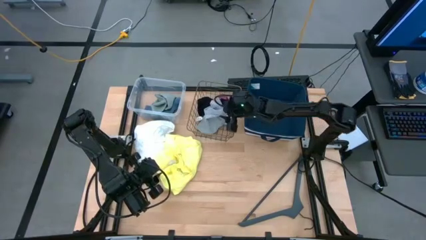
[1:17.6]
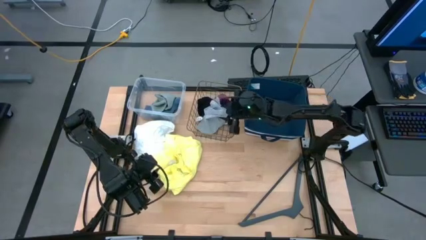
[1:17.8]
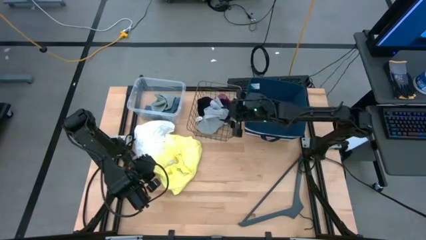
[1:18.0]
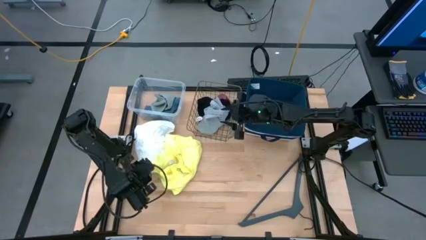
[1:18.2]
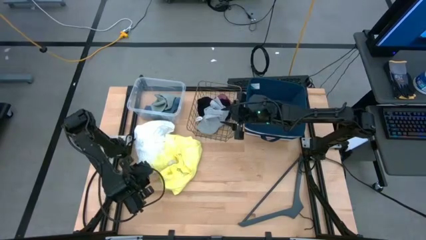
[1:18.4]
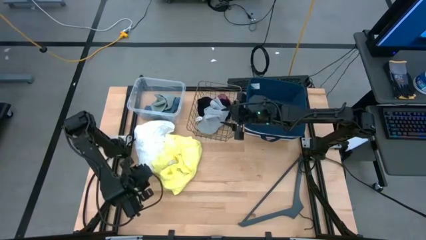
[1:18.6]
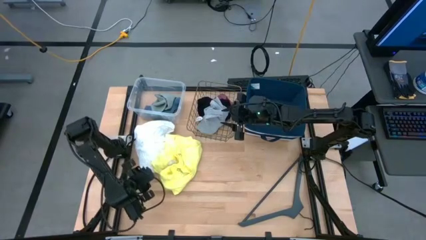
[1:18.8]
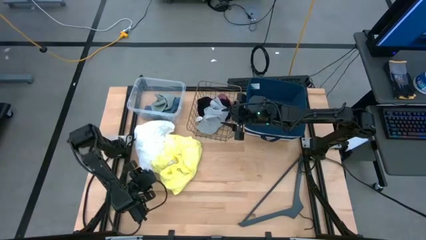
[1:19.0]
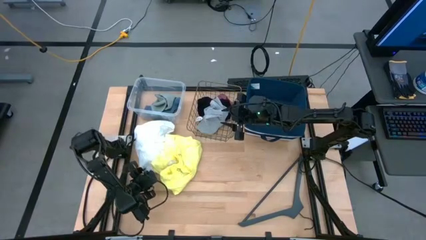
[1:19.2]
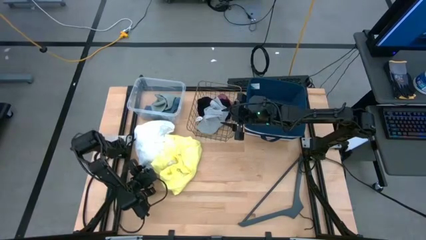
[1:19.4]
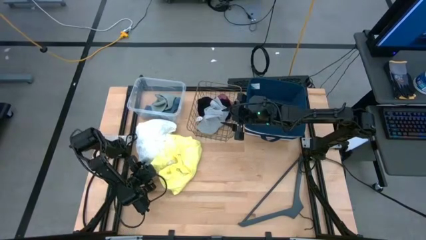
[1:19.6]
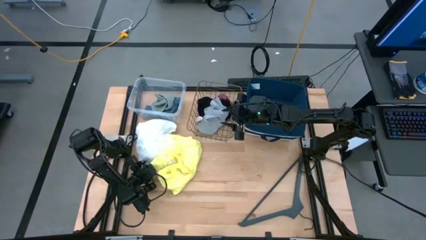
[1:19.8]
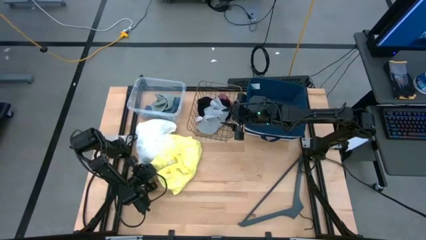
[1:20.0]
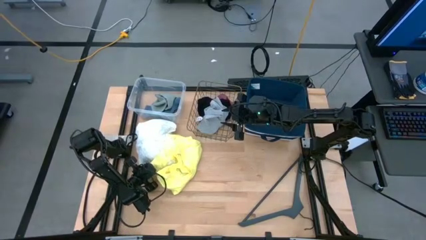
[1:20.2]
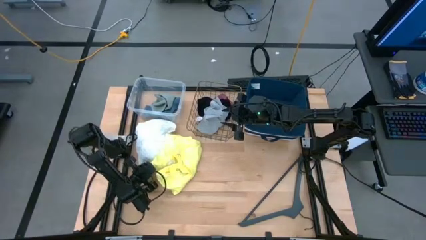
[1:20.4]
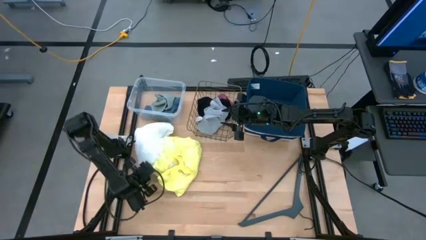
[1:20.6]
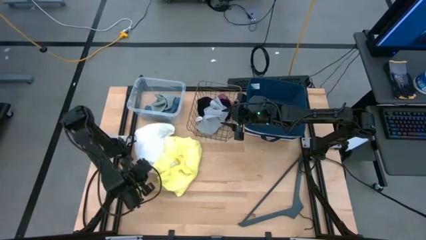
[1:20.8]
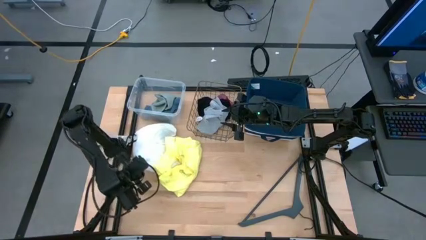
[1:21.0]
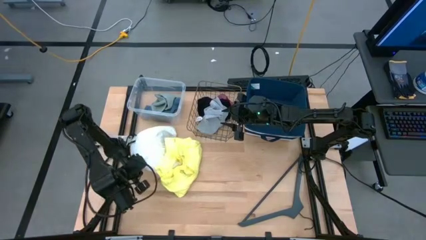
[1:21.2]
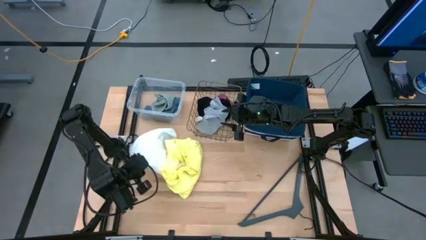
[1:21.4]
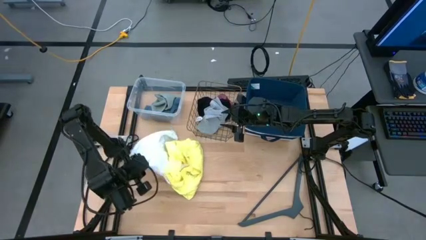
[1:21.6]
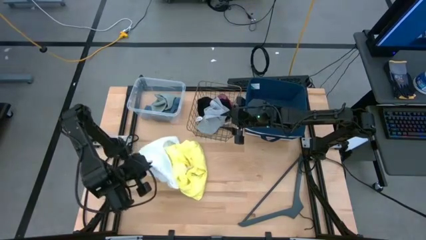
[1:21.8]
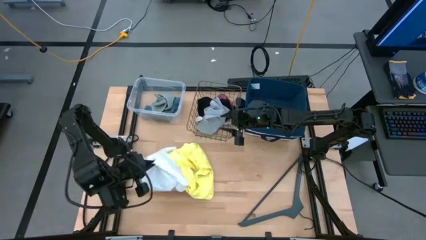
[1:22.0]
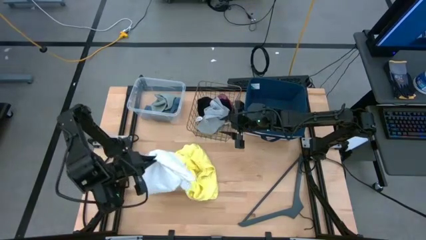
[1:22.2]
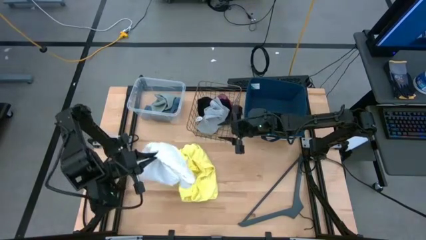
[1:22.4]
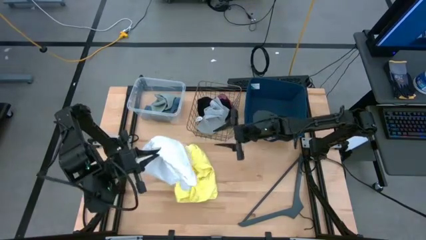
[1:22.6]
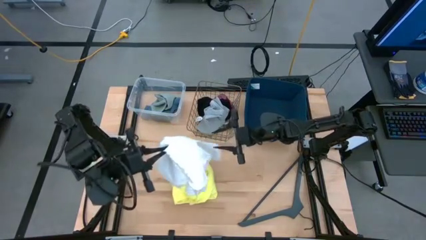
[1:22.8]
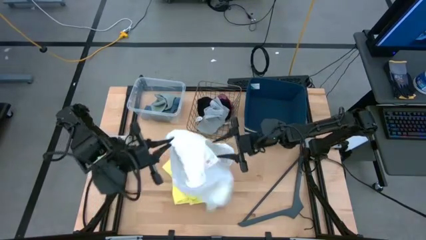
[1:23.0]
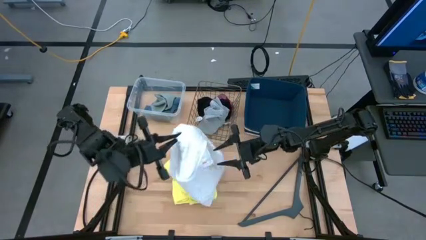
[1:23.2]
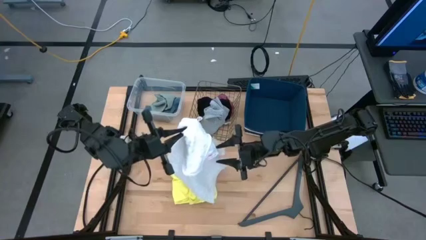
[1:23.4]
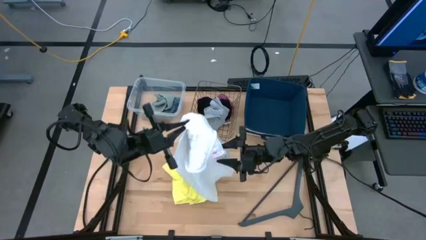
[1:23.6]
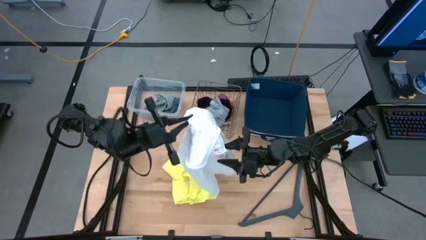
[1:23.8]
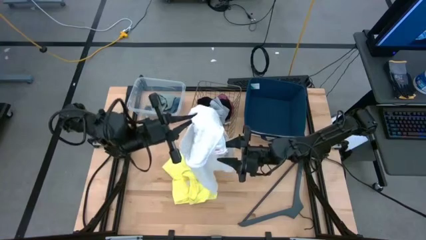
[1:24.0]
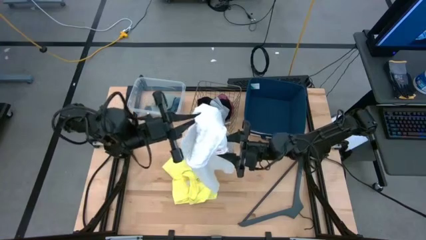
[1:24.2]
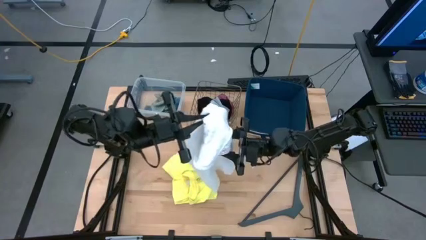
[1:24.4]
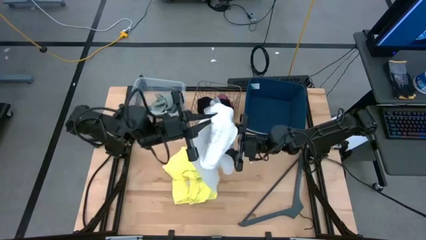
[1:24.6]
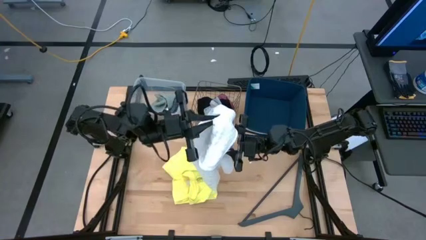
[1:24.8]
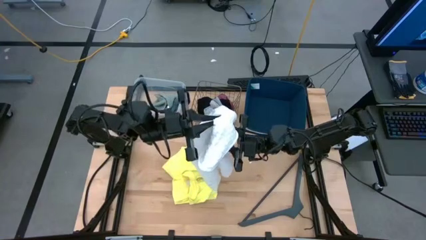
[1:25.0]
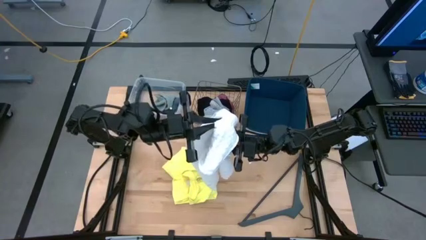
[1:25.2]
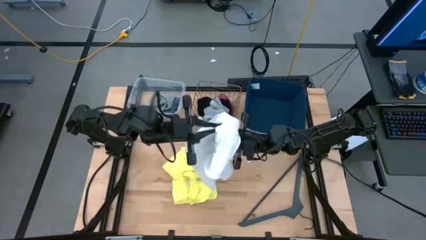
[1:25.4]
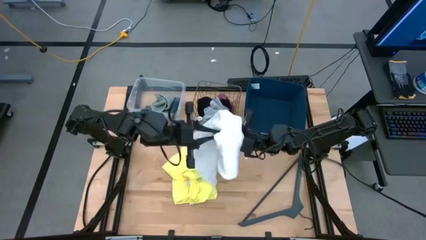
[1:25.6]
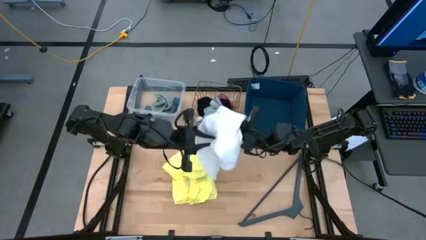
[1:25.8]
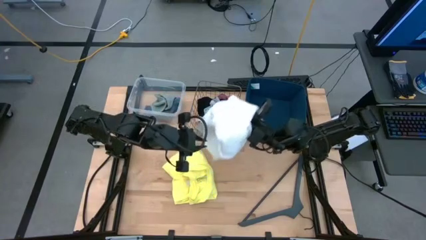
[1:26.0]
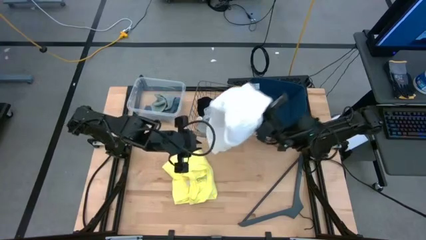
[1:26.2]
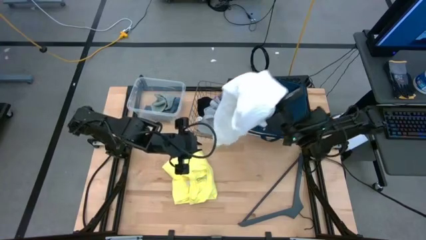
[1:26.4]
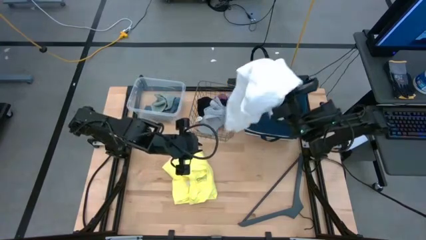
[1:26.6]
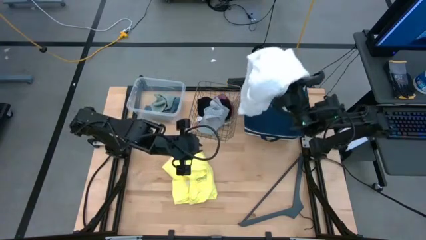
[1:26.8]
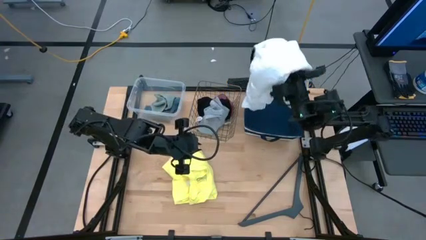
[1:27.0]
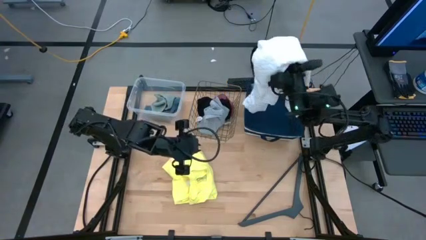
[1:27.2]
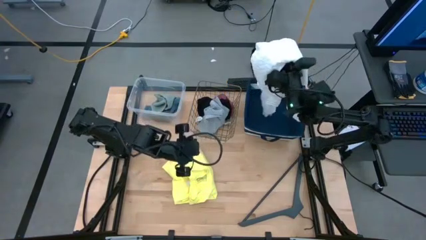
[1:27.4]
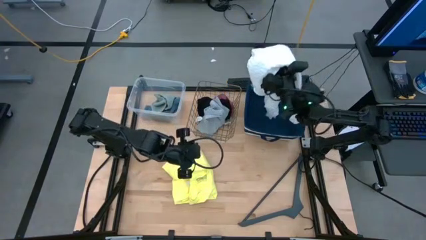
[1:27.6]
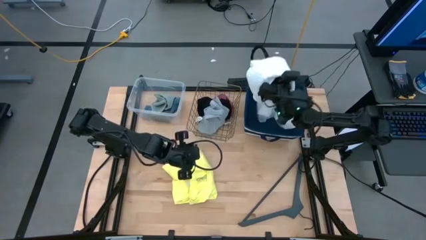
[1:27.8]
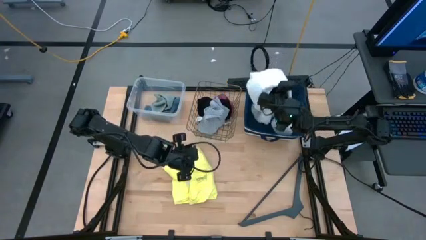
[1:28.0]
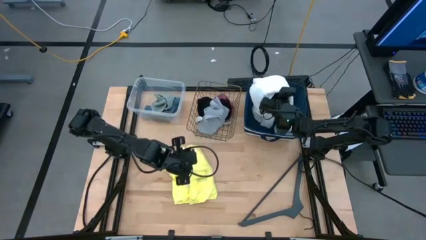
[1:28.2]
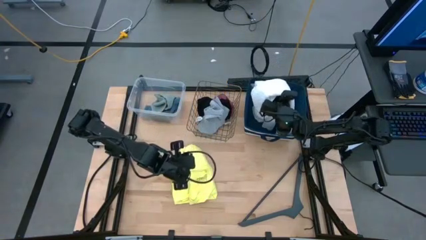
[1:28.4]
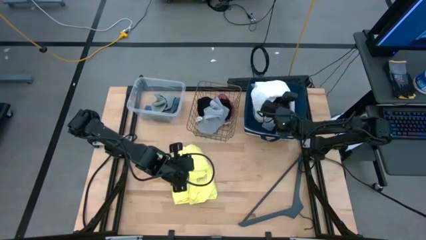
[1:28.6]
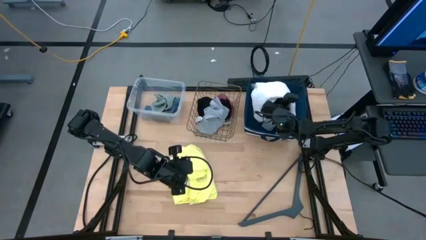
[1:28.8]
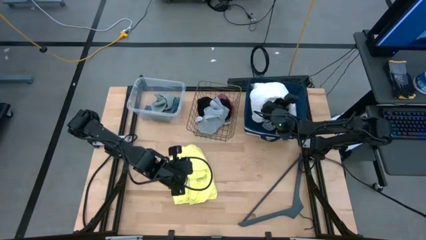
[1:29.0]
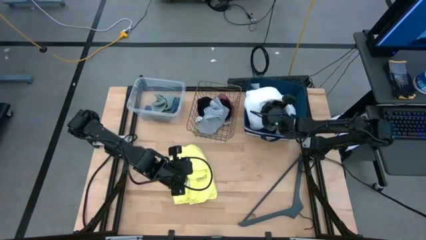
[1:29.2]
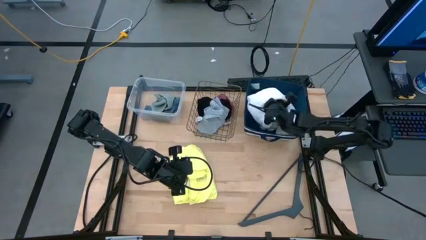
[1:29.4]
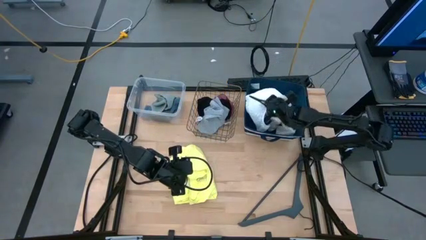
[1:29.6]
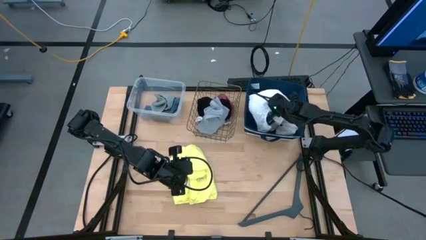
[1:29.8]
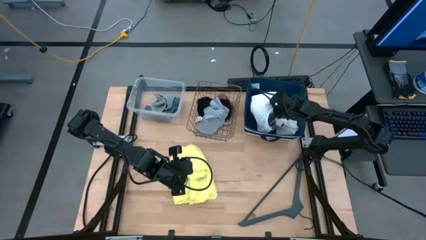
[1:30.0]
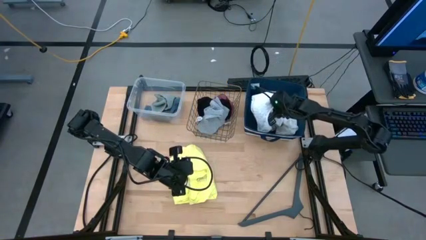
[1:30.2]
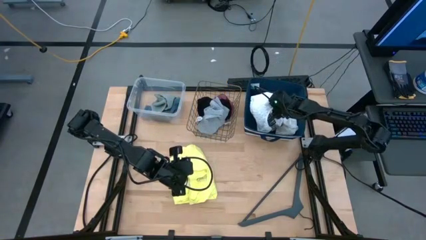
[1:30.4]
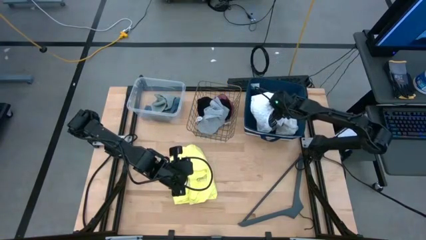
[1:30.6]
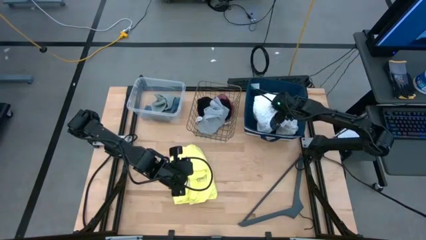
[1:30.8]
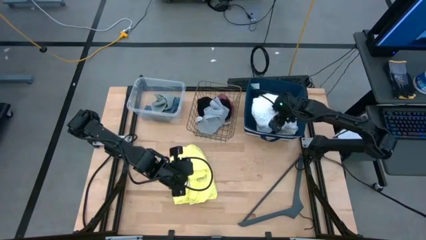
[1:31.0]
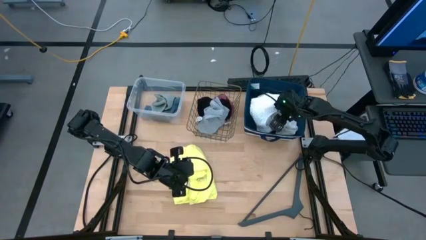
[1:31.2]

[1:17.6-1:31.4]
Task: Pick & Place Cloths
Put the white shirt into the blue bin

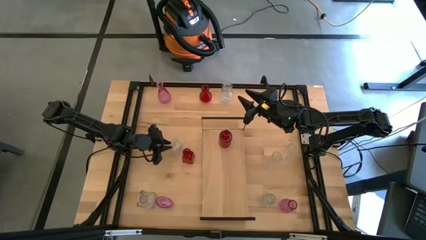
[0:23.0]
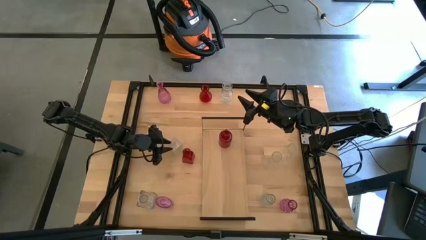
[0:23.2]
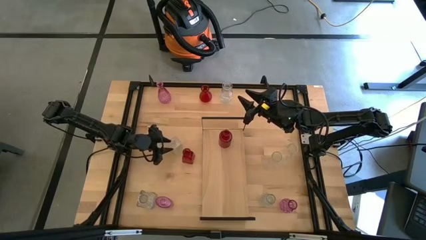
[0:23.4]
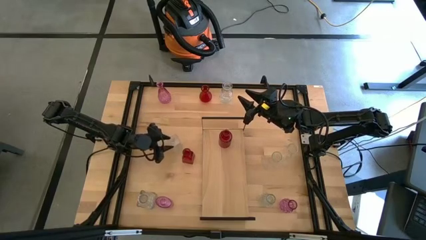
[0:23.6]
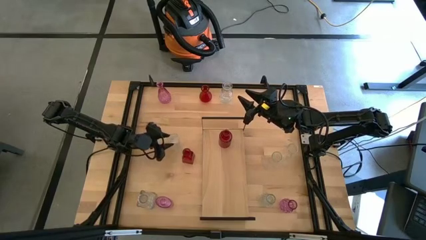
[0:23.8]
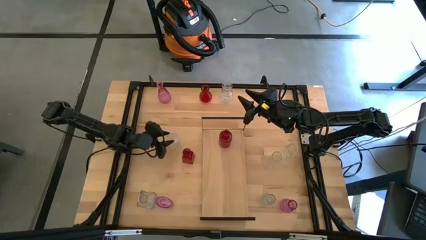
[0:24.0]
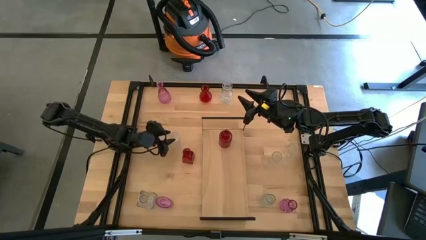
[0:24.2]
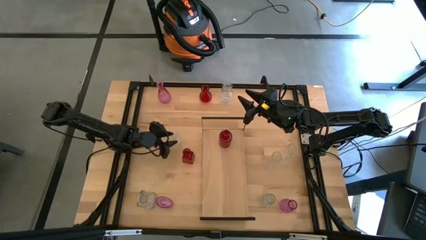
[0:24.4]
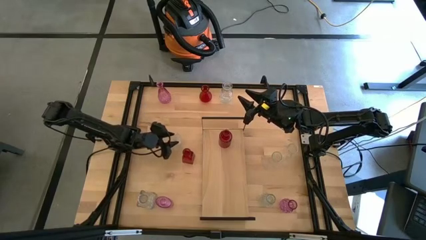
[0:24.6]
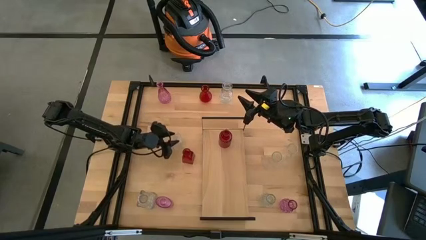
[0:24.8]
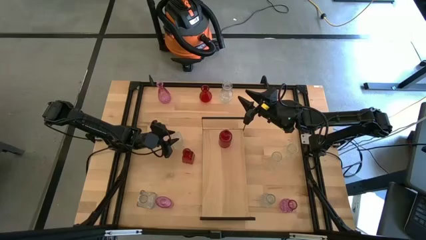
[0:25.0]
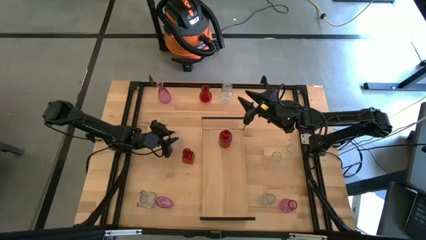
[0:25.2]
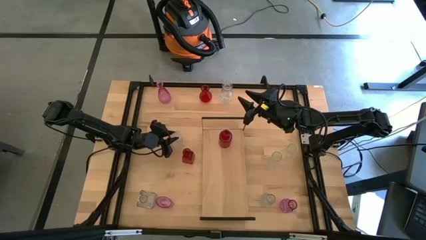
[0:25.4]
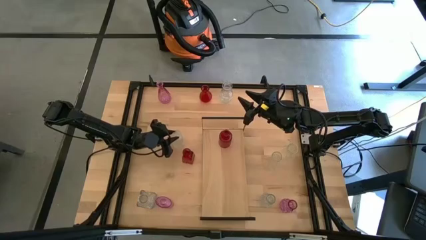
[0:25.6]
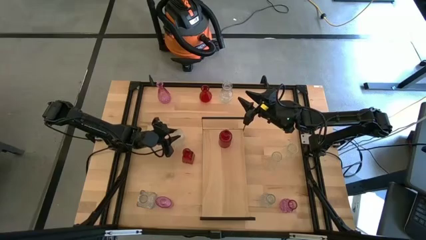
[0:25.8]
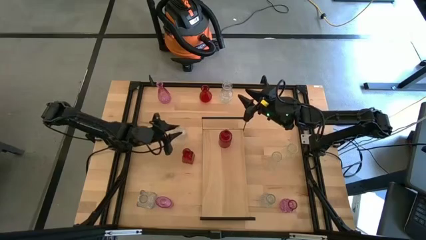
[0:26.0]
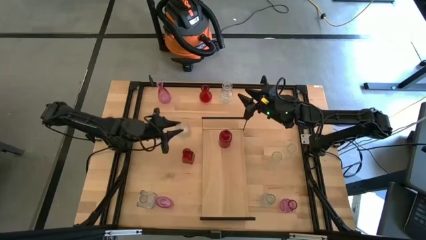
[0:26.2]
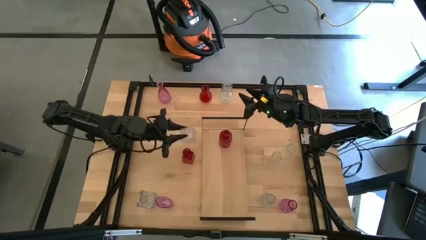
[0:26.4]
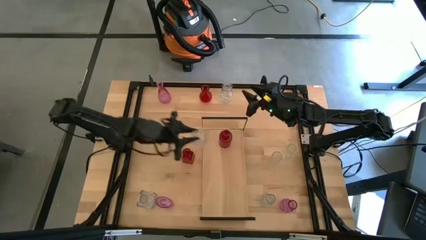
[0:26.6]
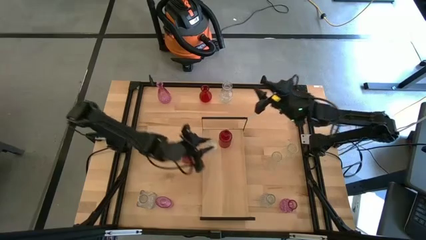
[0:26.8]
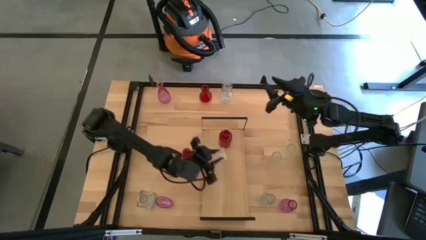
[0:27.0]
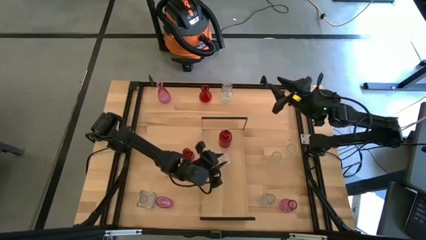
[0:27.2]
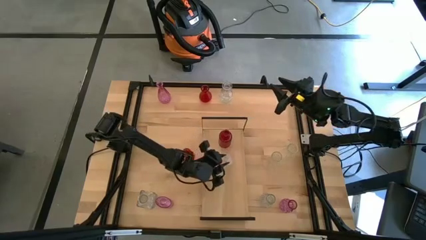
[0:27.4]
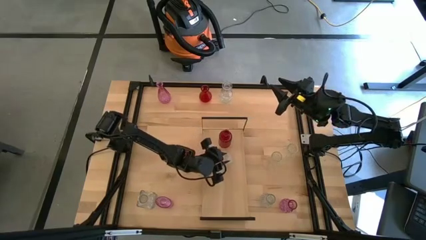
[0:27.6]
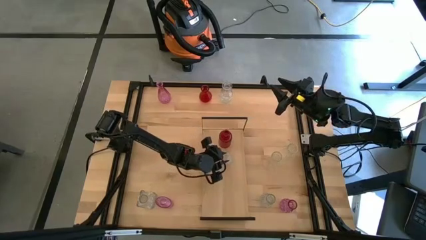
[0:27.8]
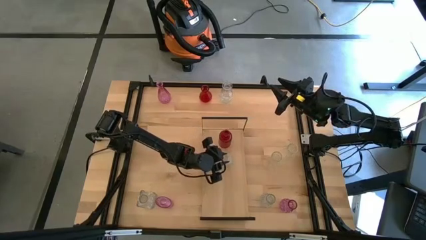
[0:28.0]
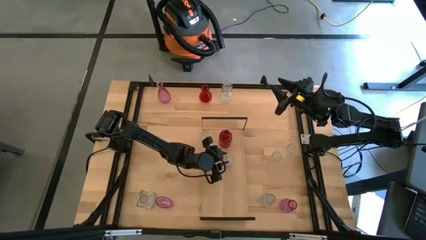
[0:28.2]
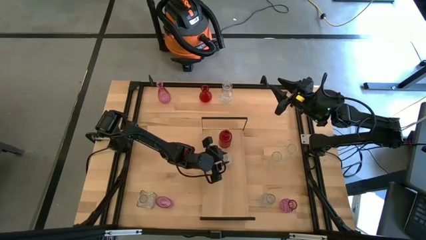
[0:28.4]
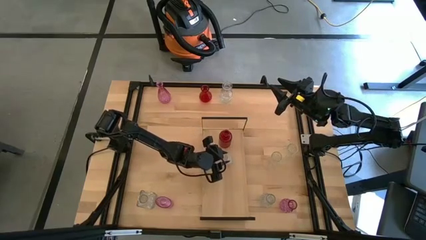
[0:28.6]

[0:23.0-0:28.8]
Task: sort vases onto shelf
Put the transparent vase on the shelf
